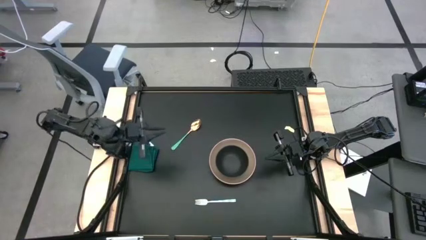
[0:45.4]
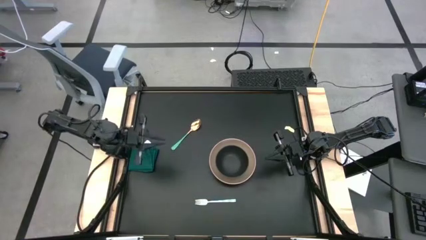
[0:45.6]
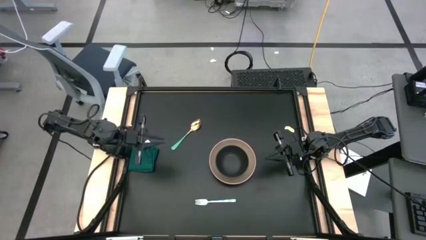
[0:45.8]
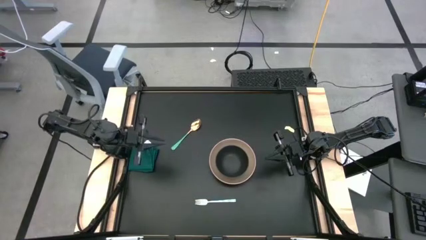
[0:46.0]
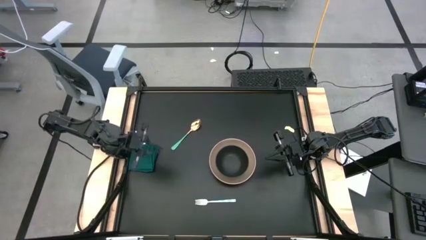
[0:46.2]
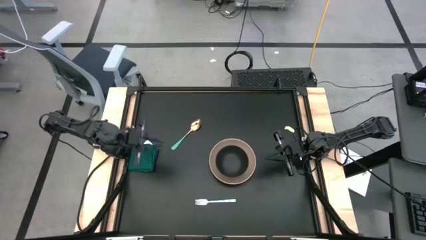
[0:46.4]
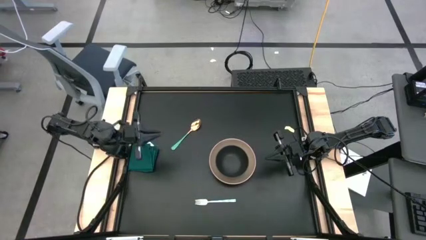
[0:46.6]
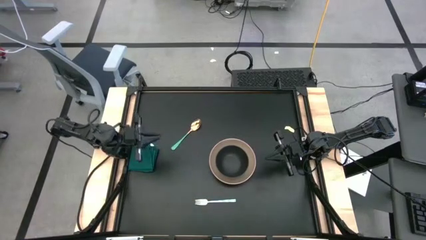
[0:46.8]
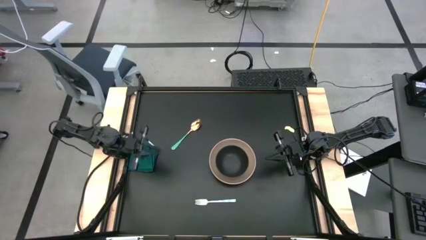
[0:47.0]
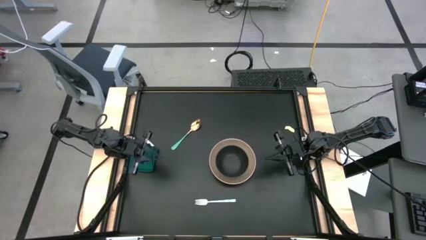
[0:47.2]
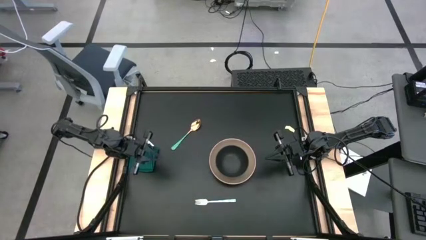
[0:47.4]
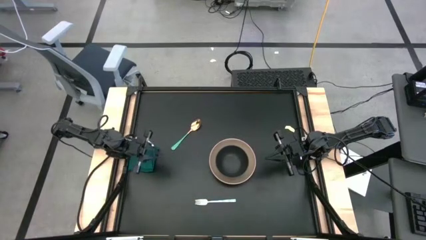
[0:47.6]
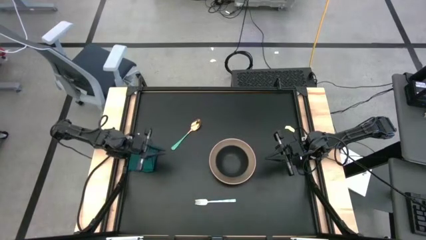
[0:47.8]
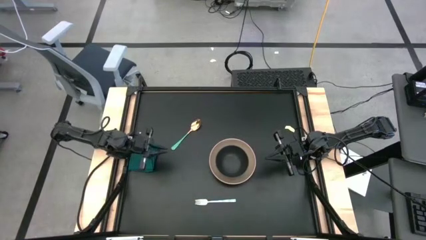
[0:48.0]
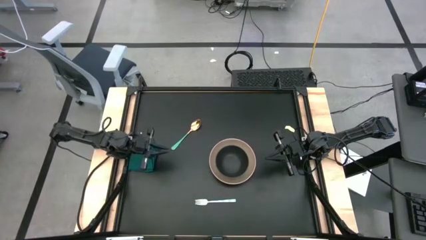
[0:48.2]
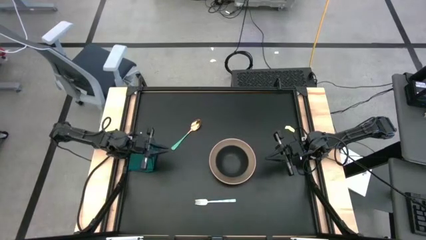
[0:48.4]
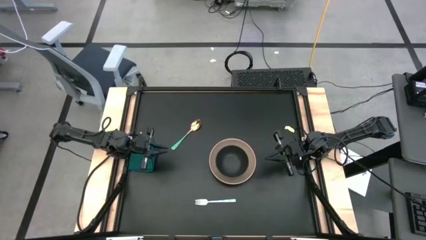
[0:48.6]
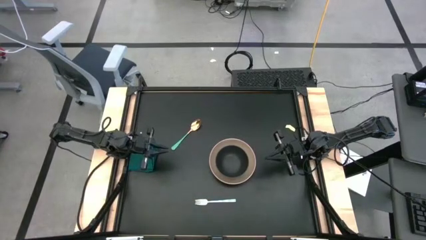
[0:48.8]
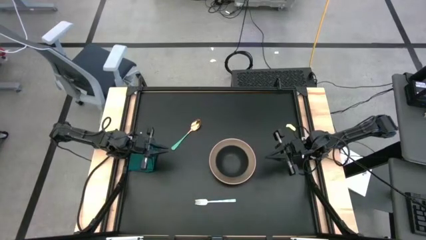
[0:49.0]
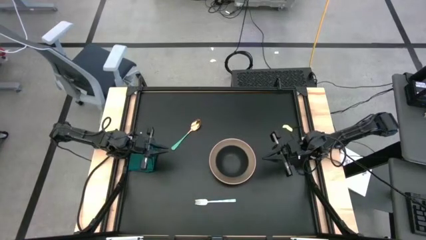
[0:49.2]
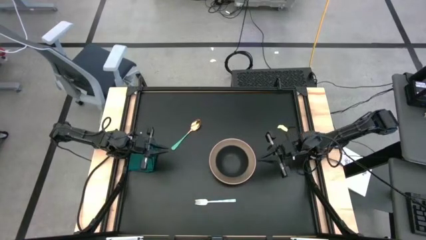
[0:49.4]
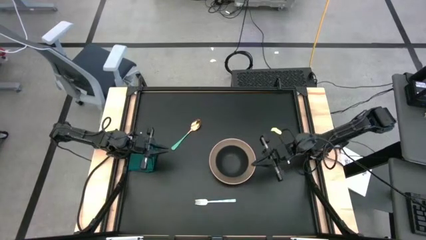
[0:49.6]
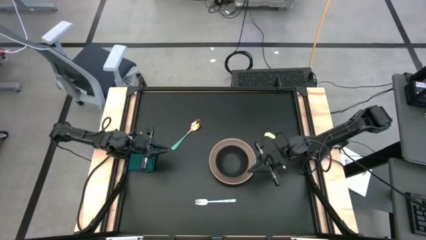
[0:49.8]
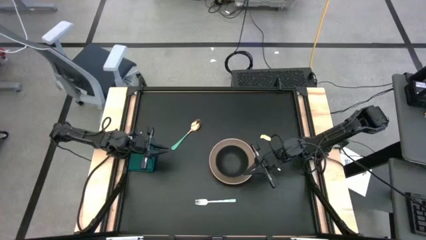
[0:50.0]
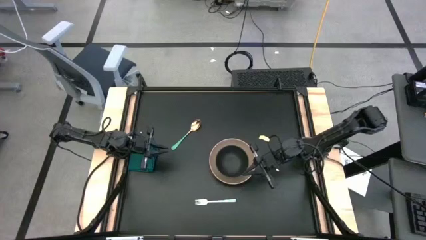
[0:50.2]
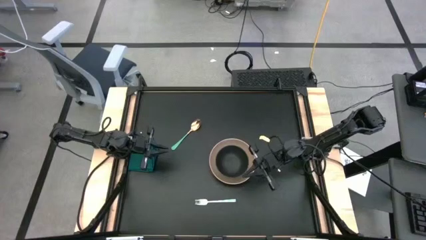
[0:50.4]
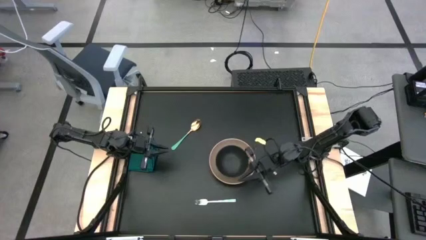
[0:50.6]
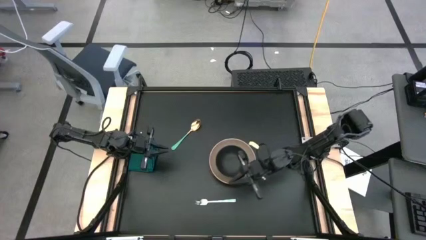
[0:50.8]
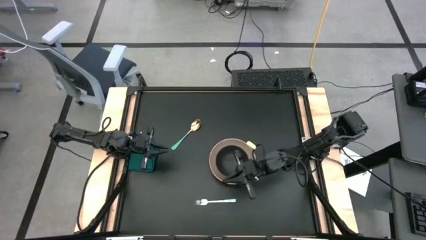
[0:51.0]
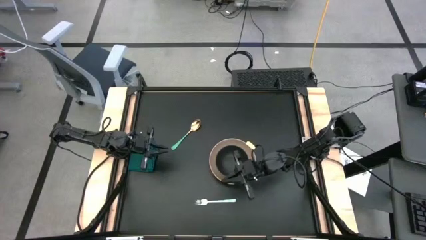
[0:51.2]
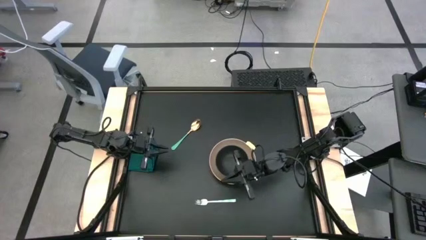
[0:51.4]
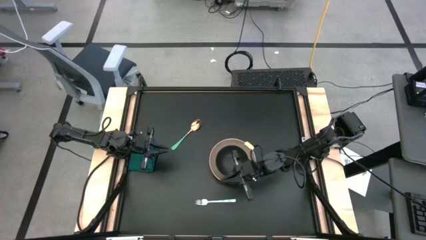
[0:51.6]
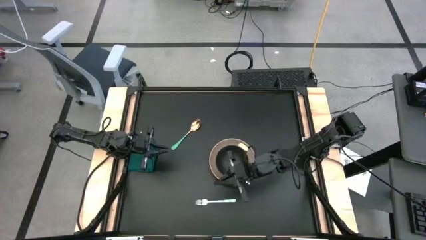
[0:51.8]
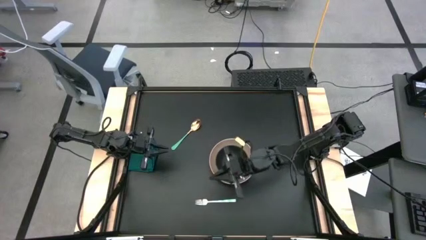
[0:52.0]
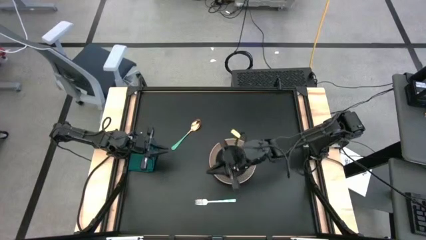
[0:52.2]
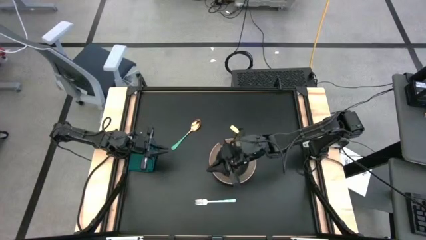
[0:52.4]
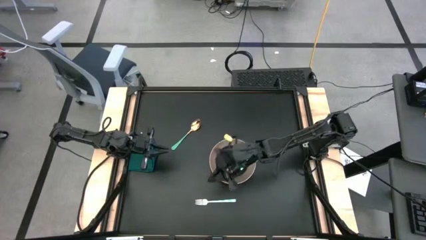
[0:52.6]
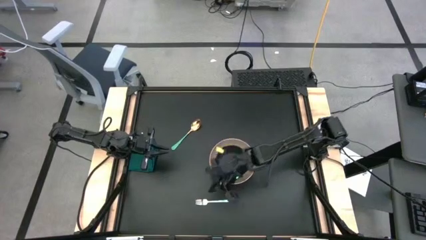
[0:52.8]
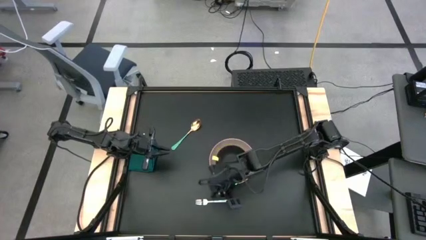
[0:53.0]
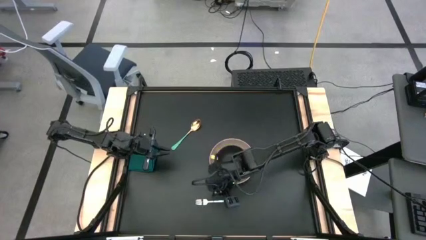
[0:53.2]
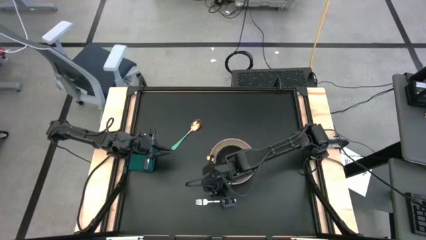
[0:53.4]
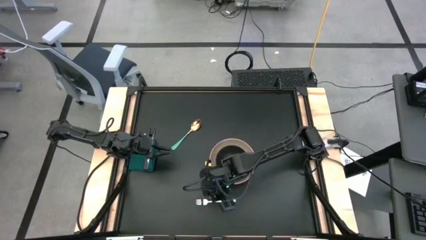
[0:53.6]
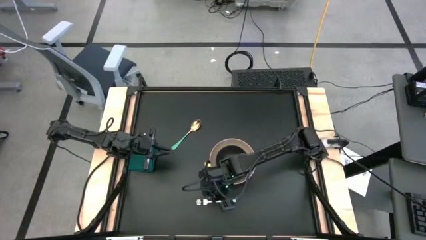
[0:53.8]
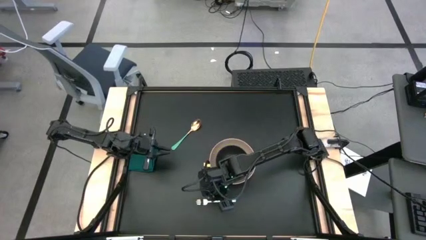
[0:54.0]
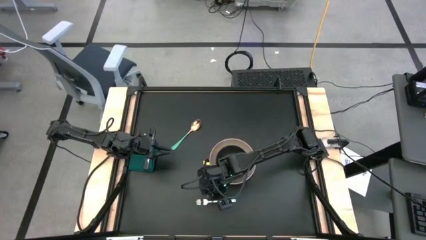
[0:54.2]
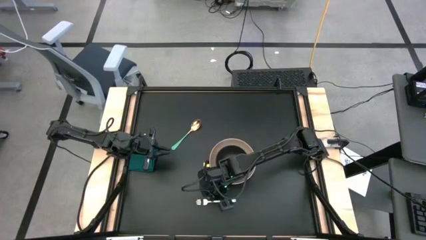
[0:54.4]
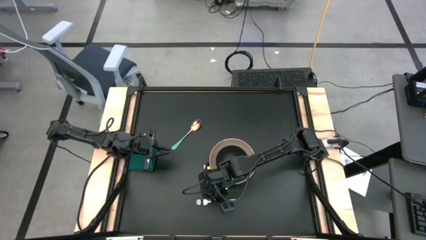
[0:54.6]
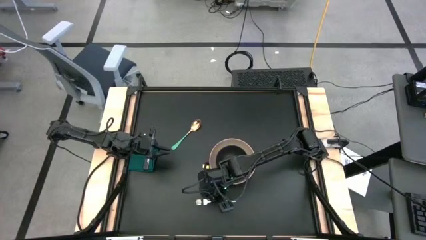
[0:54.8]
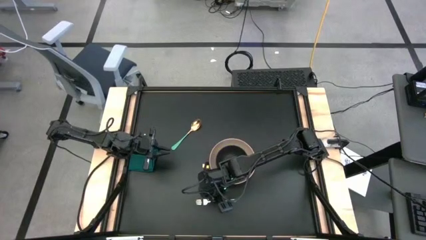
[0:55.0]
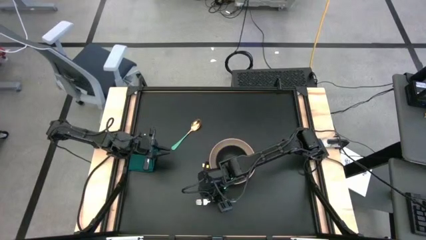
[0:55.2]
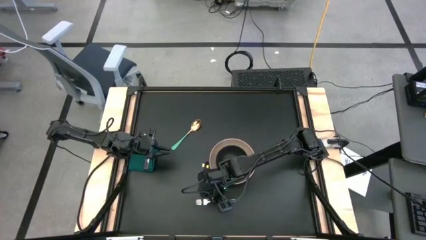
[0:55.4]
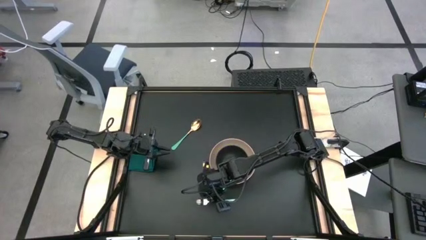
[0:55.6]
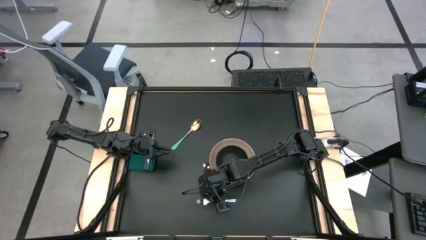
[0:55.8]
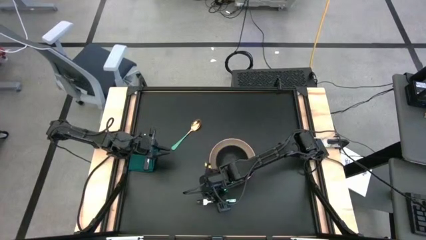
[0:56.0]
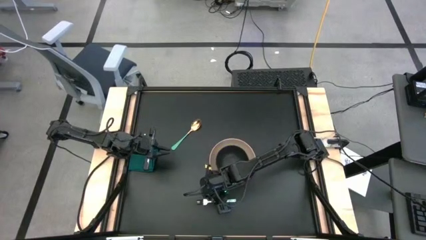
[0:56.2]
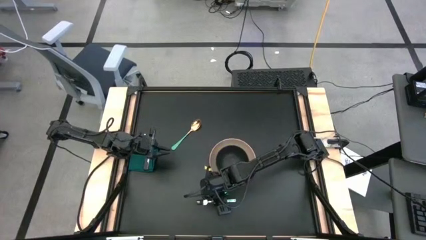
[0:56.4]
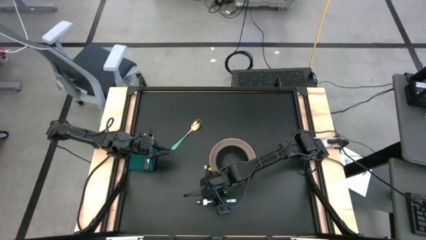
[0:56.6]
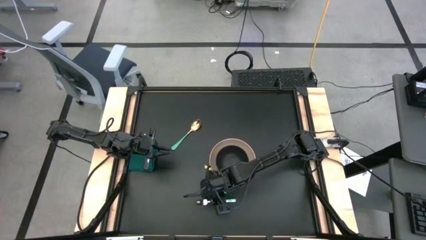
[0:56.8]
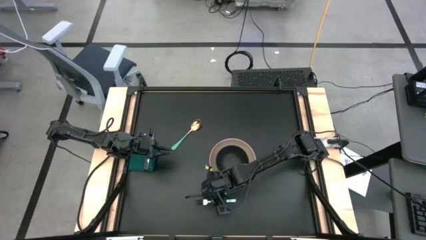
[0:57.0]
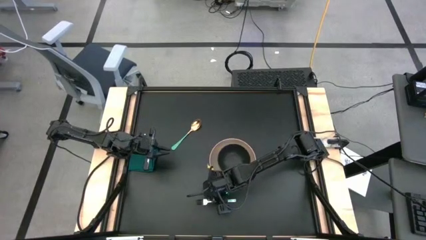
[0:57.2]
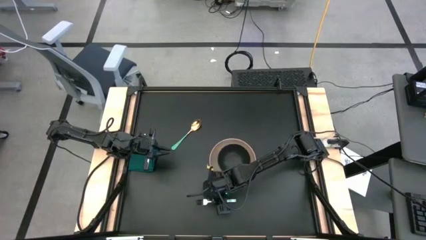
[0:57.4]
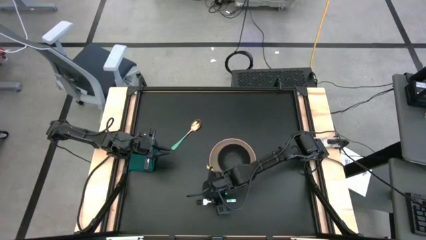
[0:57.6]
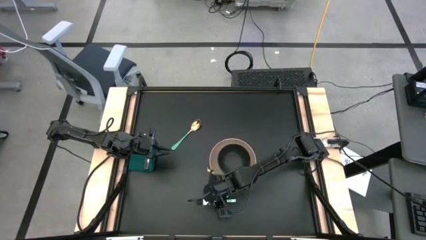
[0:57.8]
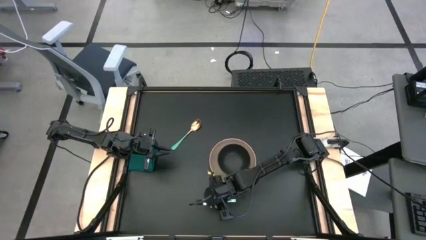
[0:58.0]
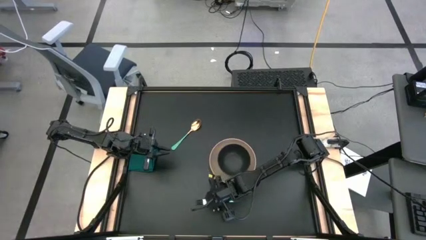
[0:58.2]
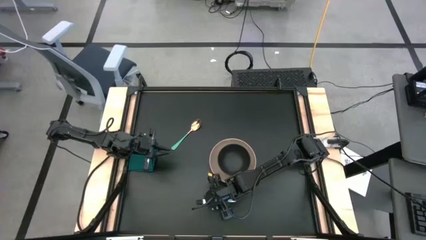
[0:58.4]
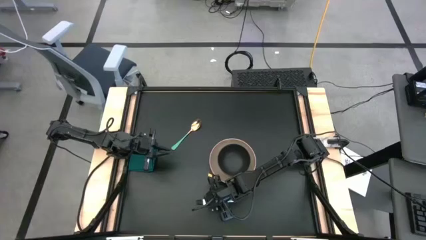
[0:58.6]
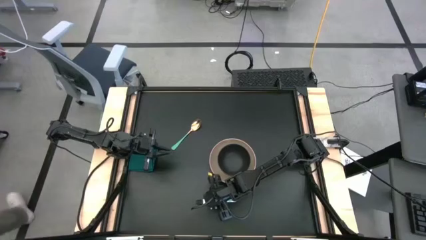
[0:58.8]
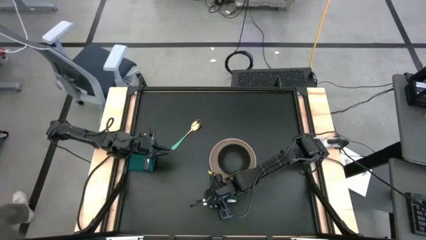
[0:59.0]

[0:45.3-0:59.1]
Task: Set table place
Put the fork to the right of the plate
